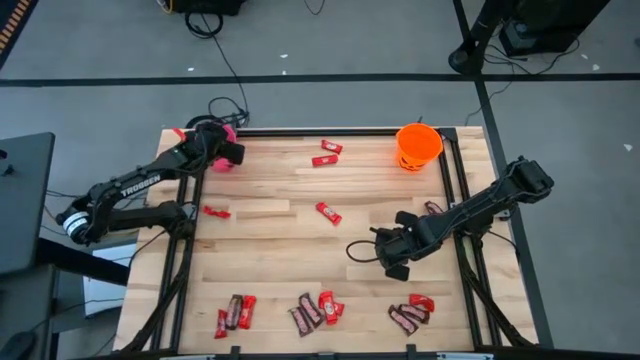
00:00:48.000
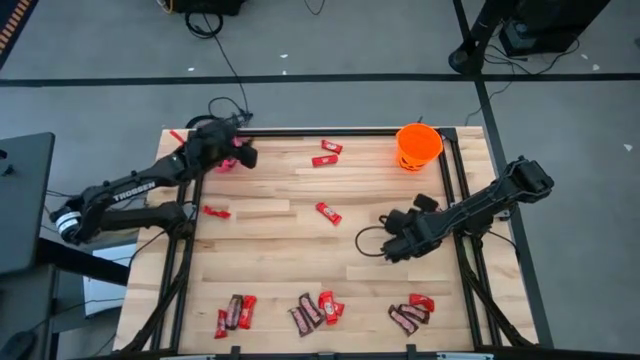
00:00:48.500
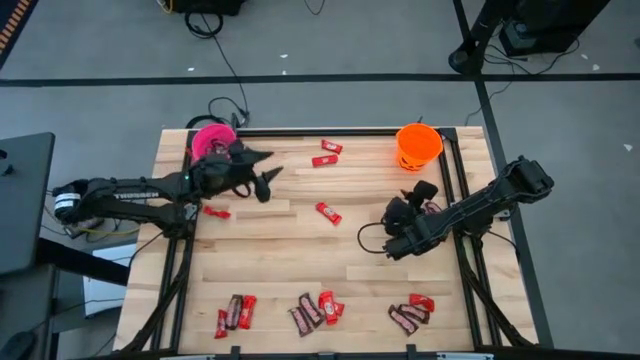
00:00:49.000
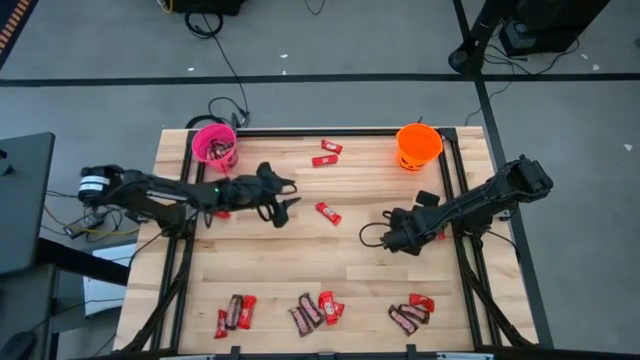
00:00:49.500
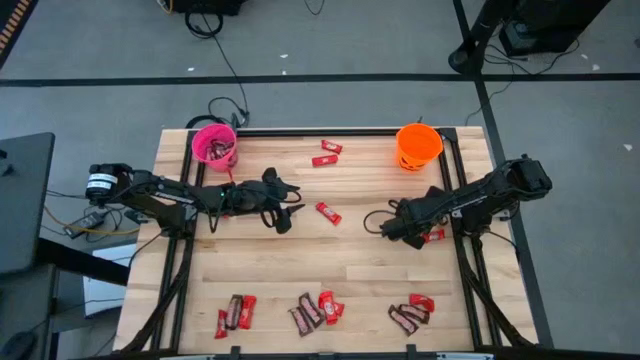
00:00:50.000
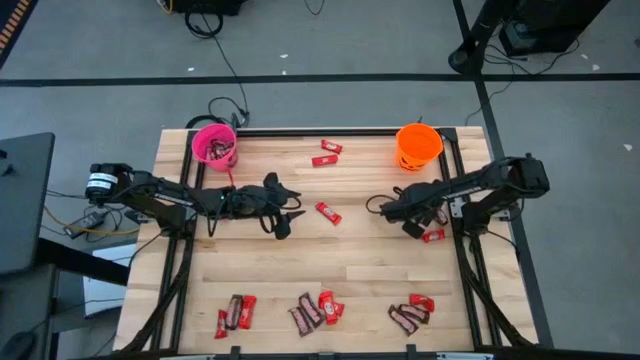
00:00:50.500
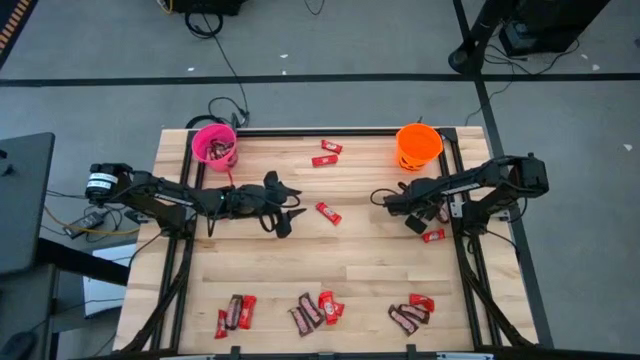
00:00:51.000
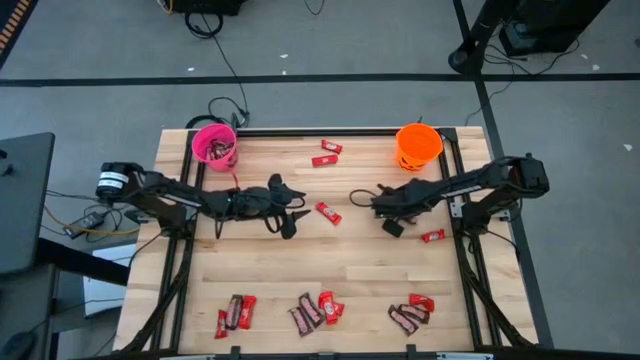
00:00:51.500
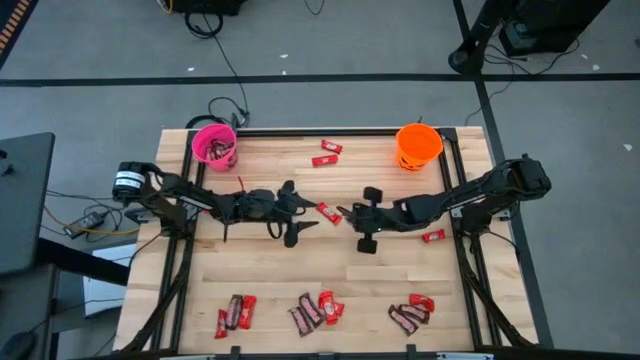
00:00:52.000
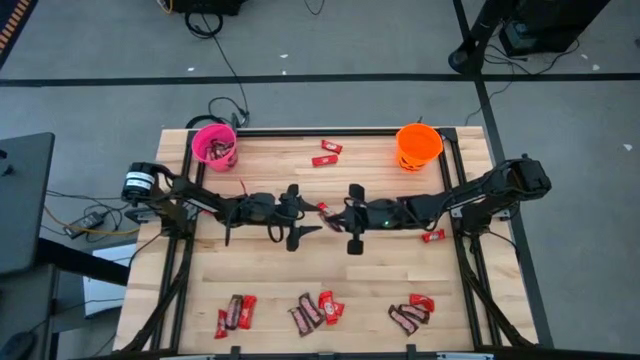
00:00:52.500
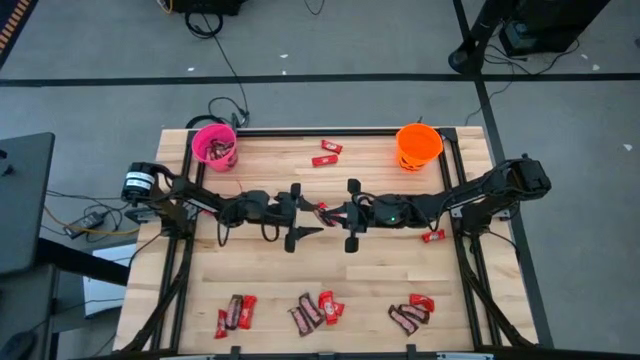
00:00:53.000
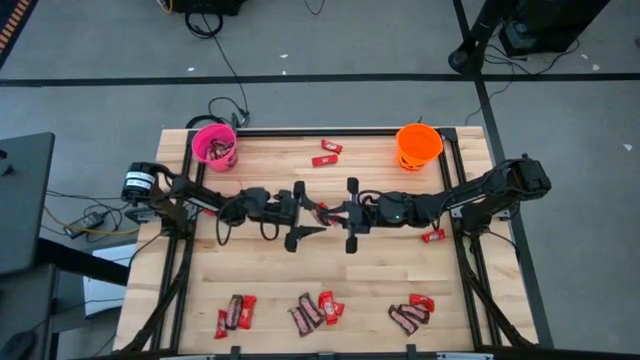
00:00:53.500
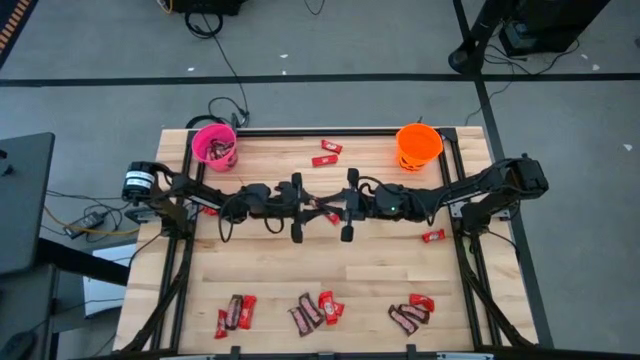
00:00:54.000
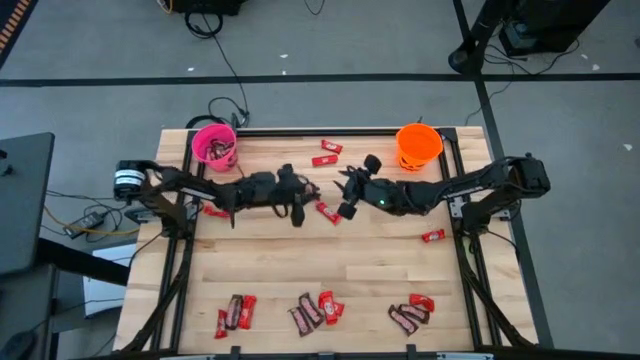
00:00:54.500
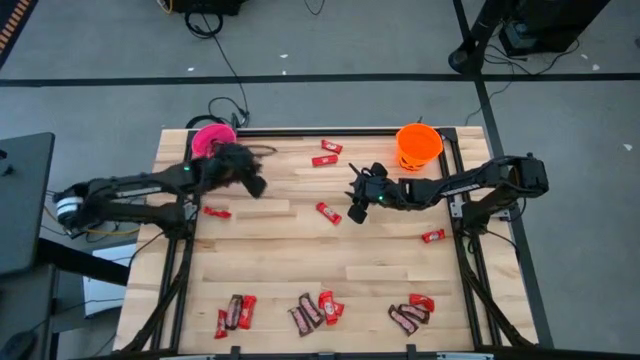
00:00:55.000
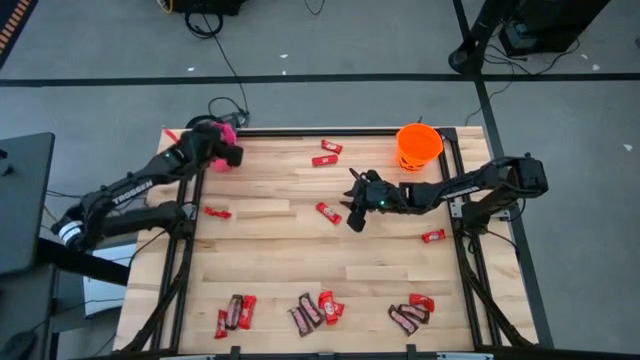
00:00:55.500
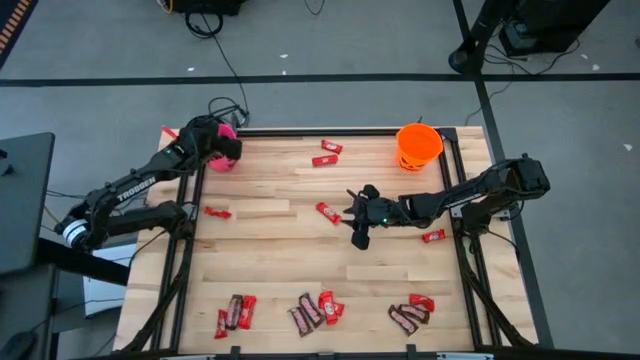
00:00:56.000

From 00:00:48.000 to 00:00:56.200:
Task: Sort candy by brand, put in halloween buckets
Put the brown chocolate bar into the pink bucket

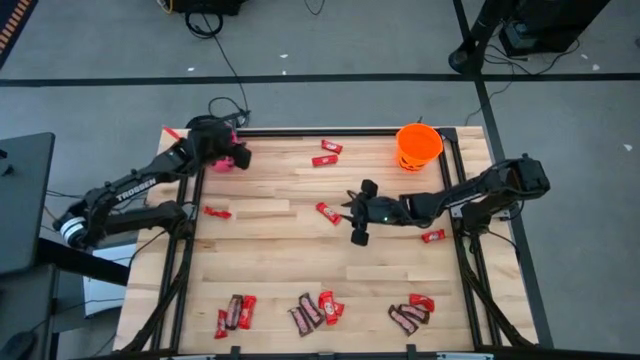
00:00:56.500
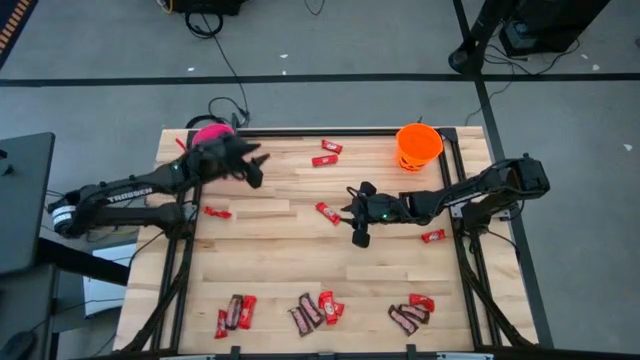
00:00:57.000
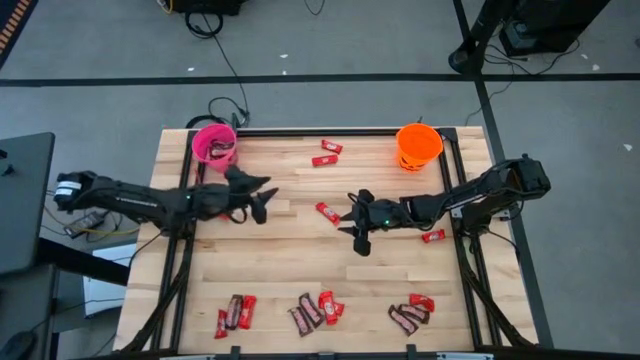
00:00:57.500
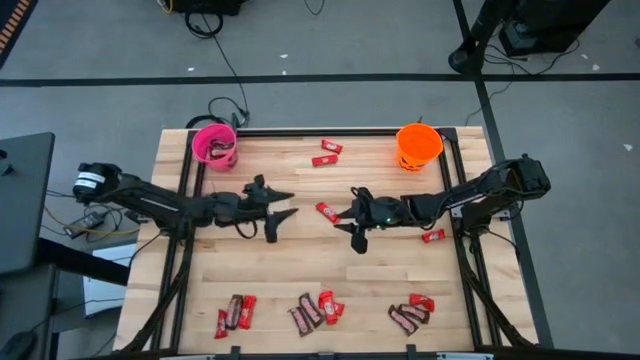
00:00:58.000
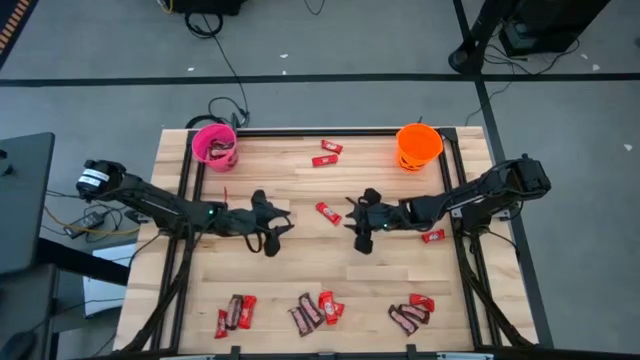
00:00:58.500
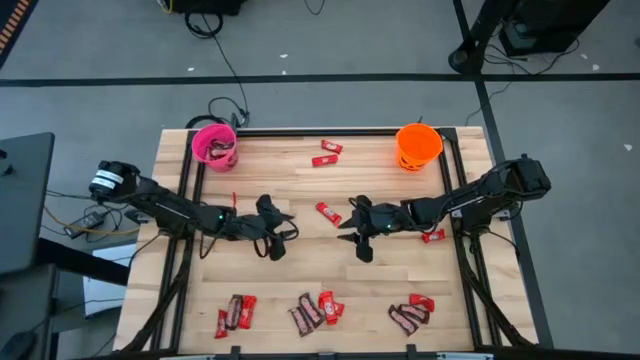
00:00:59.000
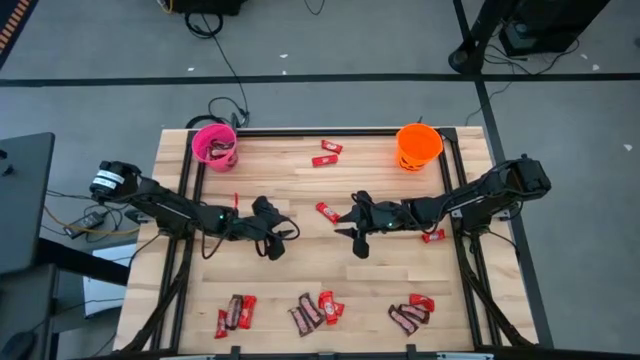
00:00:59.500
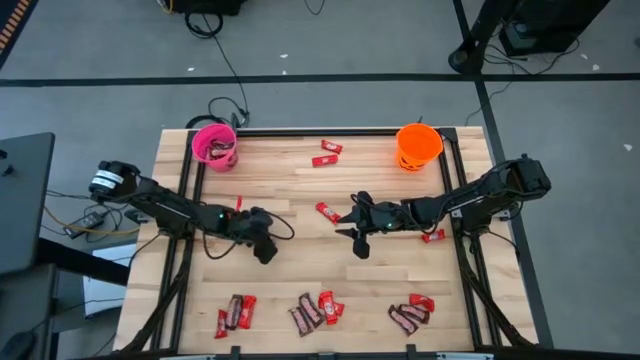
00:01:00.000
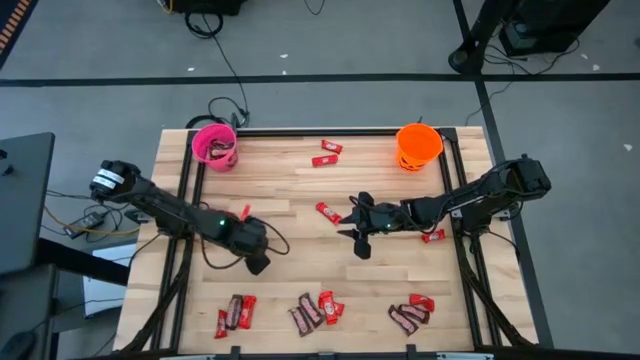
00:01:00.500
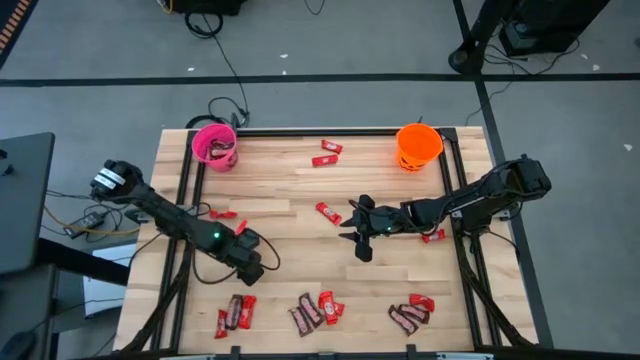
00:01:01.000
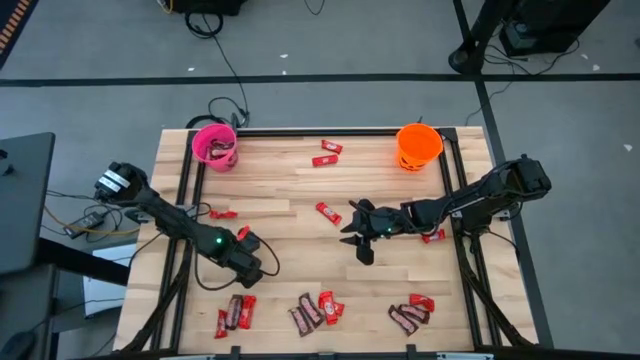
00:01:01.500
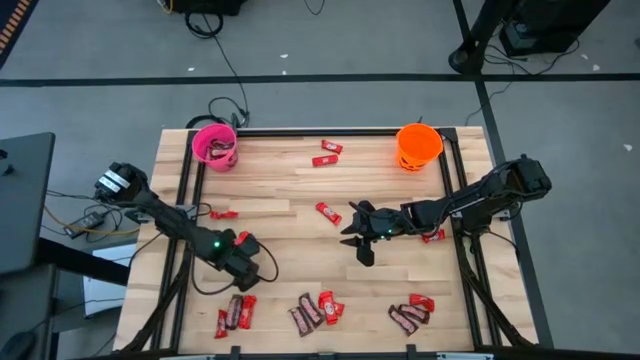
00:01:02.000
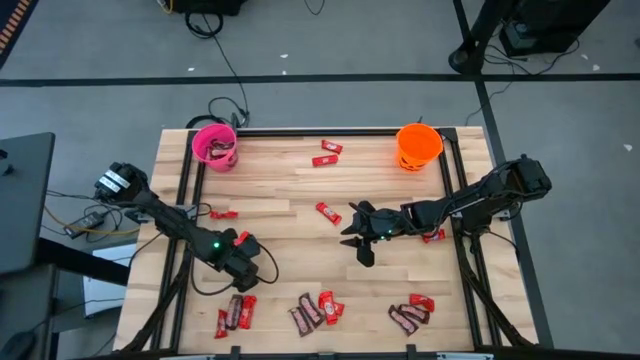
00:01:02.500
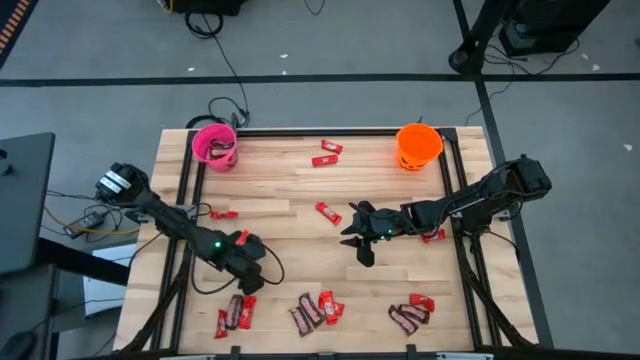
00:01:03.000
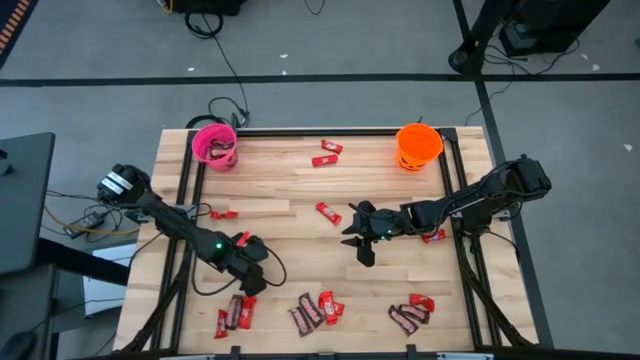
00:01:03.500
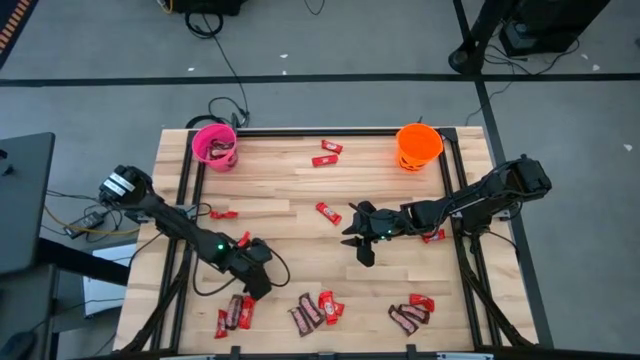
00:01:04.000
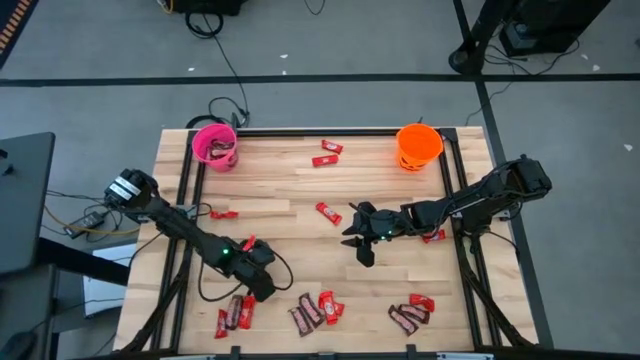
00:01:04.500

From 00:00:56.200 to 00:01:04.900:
Put the brown chocolate bar into the pink bucket

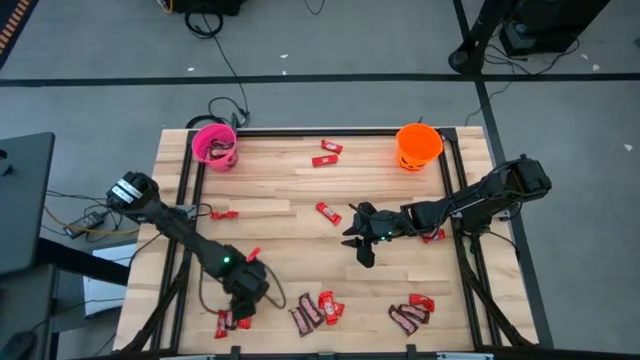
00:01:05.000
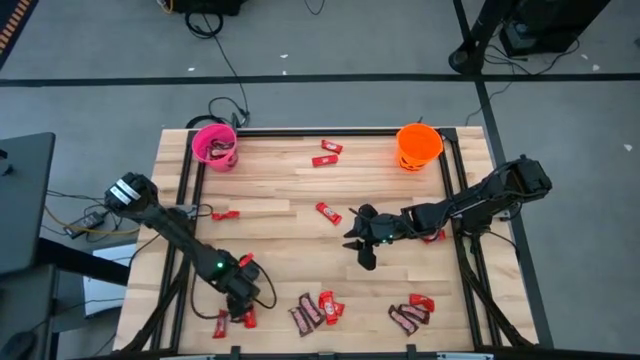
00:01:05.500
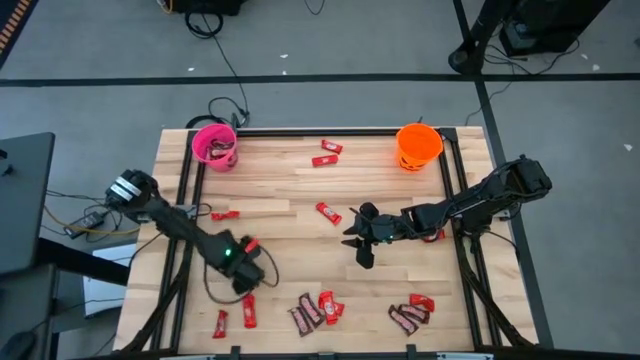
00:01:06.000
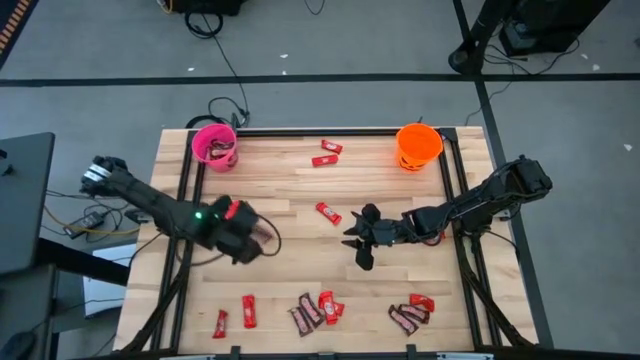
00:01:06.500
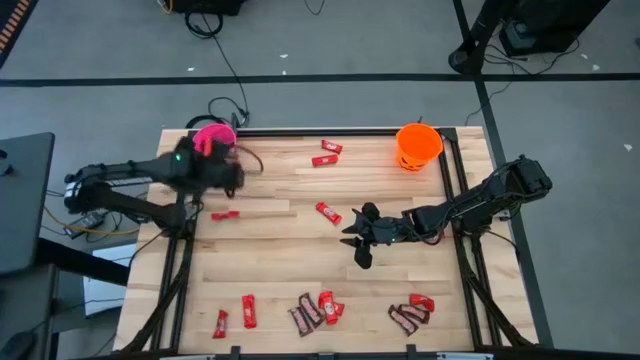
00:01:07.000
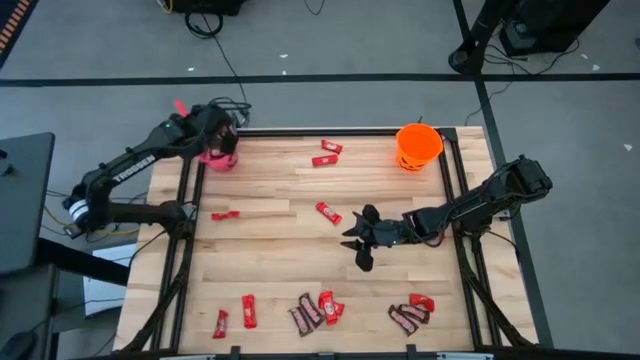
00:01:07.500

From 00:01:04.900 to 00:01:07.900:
Put the brown chocolate bar into the pink bucket
